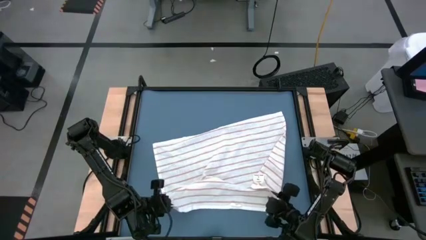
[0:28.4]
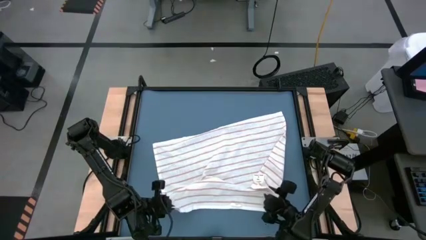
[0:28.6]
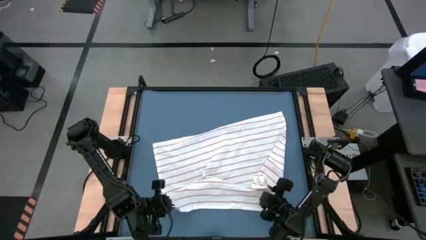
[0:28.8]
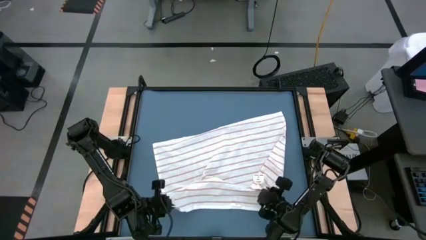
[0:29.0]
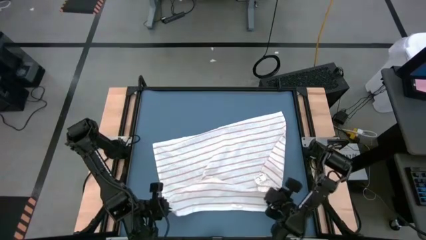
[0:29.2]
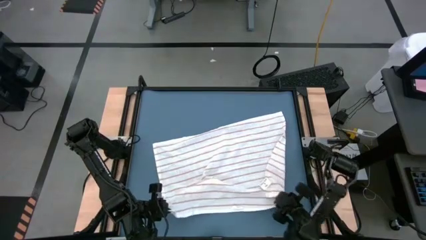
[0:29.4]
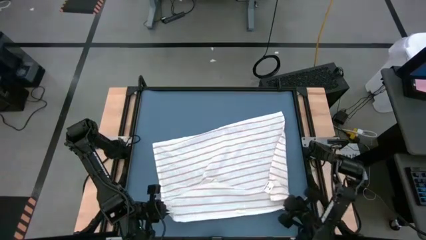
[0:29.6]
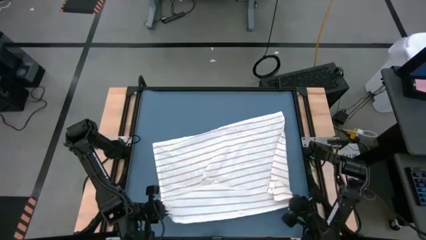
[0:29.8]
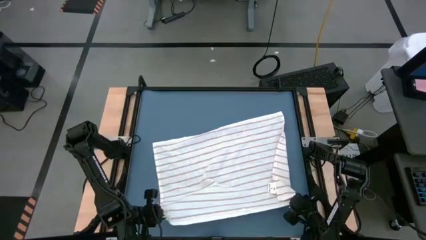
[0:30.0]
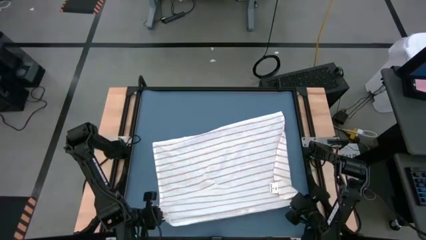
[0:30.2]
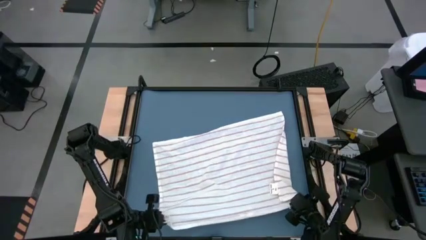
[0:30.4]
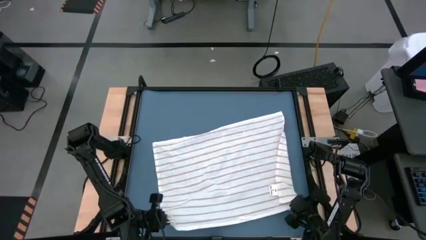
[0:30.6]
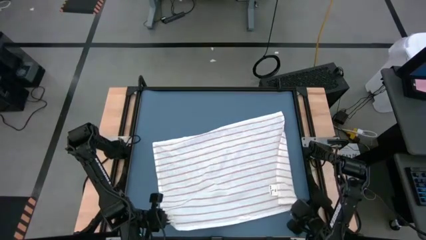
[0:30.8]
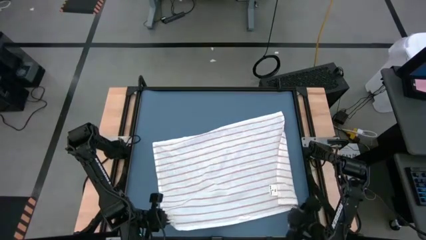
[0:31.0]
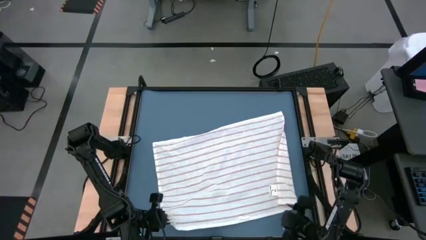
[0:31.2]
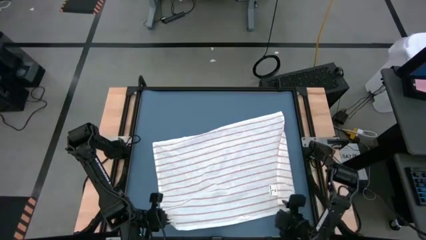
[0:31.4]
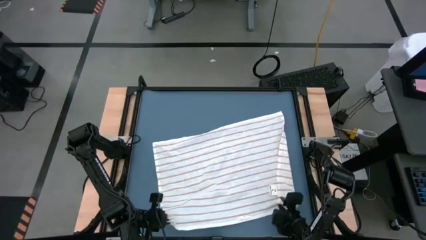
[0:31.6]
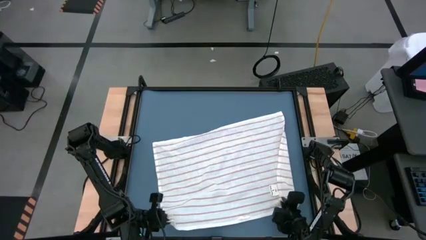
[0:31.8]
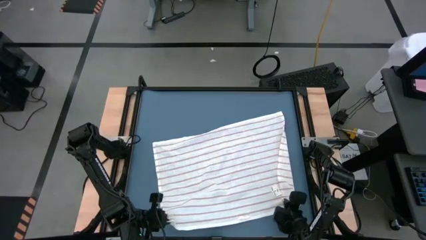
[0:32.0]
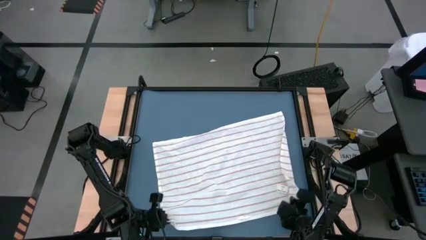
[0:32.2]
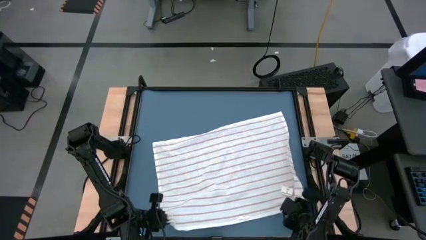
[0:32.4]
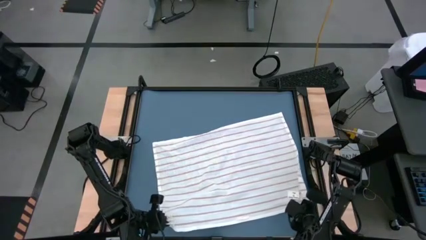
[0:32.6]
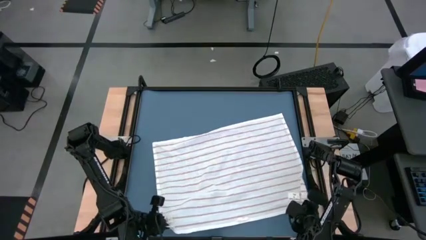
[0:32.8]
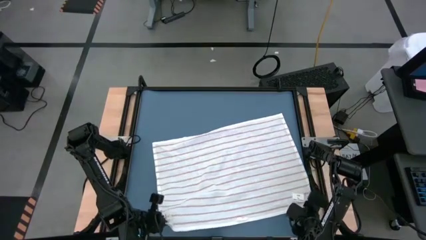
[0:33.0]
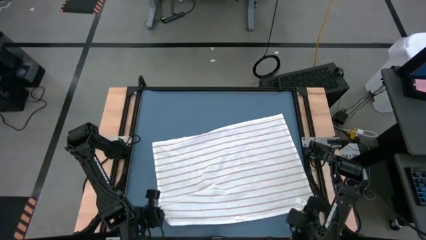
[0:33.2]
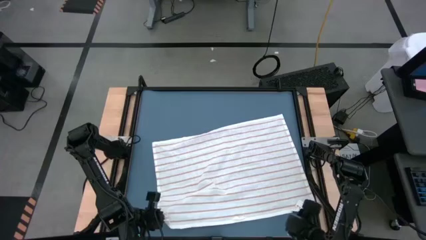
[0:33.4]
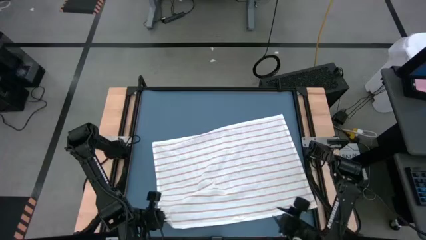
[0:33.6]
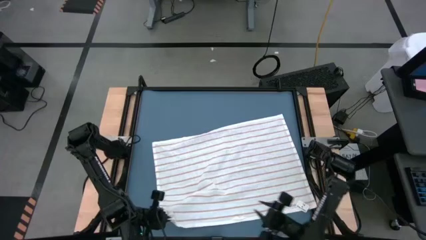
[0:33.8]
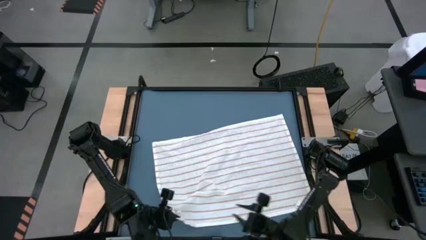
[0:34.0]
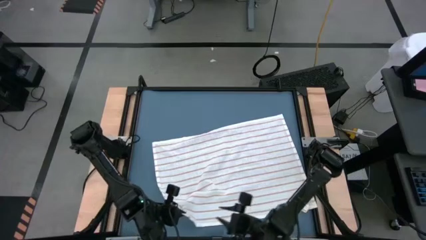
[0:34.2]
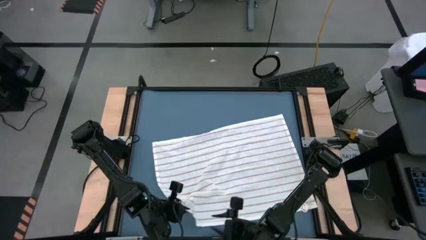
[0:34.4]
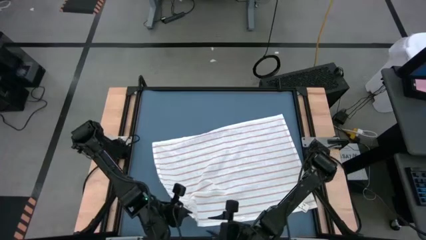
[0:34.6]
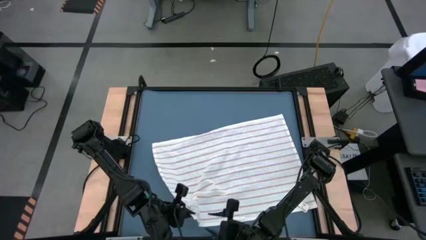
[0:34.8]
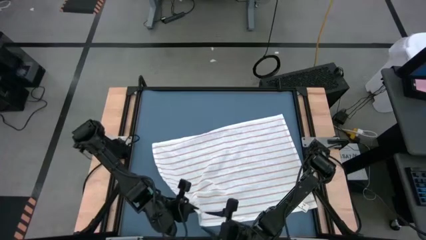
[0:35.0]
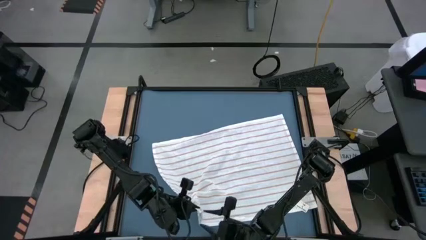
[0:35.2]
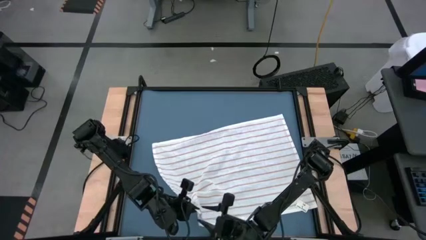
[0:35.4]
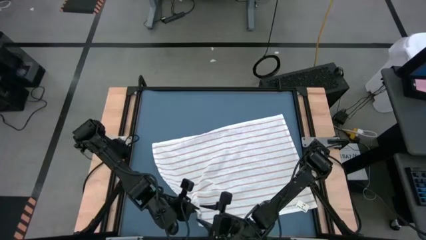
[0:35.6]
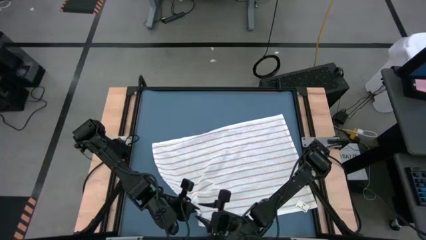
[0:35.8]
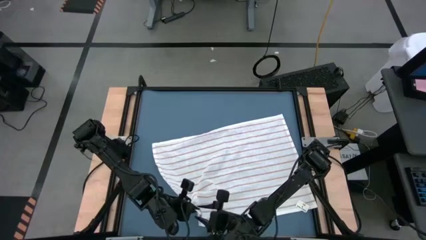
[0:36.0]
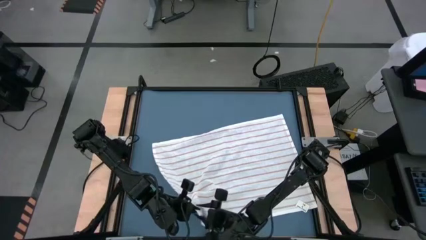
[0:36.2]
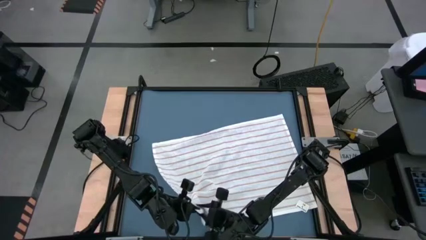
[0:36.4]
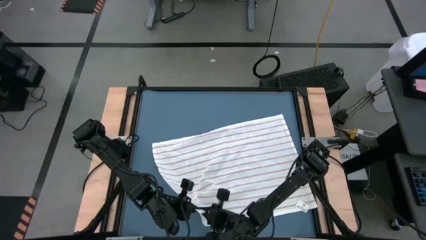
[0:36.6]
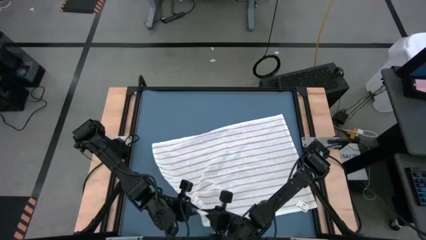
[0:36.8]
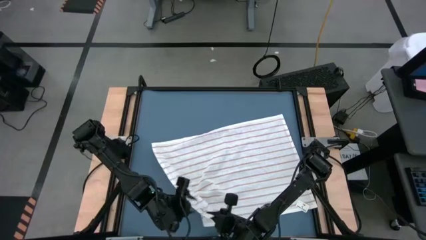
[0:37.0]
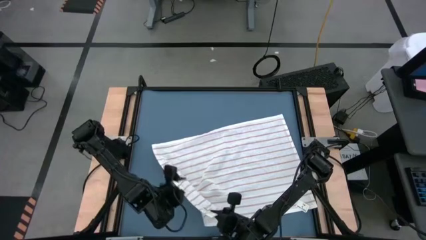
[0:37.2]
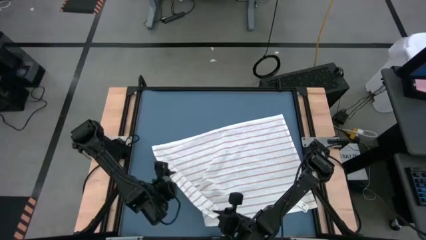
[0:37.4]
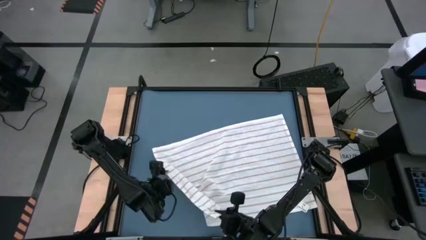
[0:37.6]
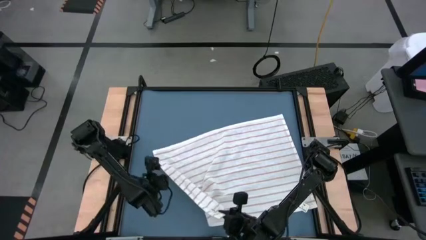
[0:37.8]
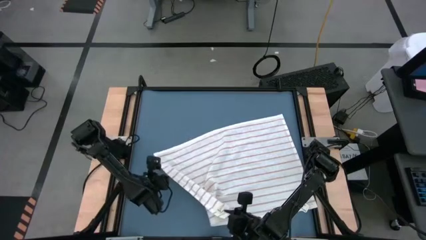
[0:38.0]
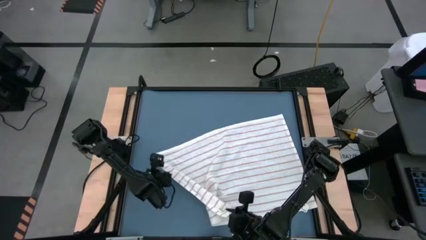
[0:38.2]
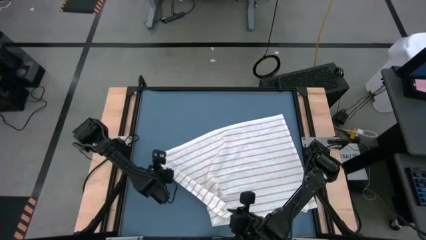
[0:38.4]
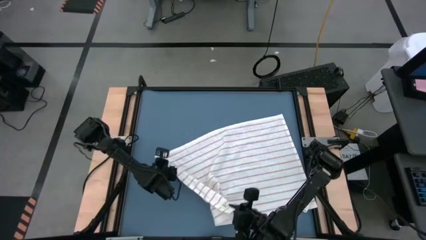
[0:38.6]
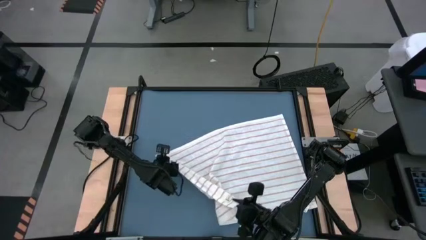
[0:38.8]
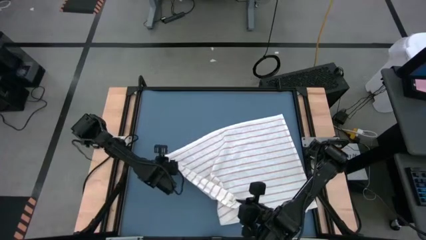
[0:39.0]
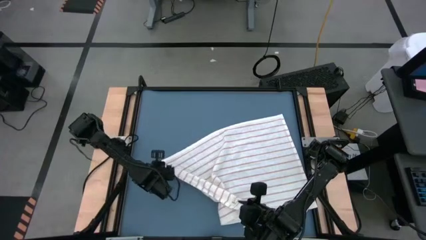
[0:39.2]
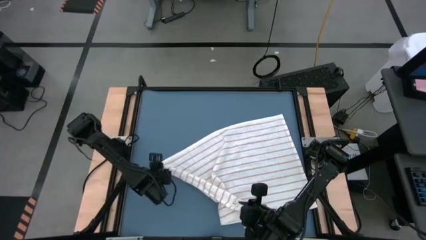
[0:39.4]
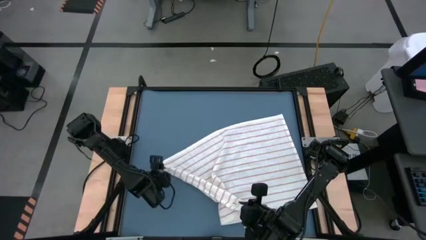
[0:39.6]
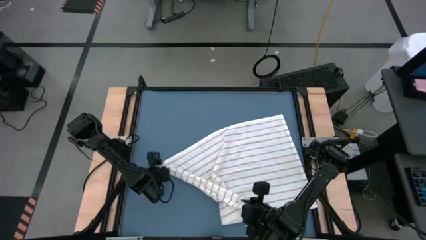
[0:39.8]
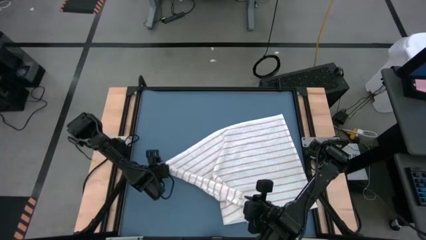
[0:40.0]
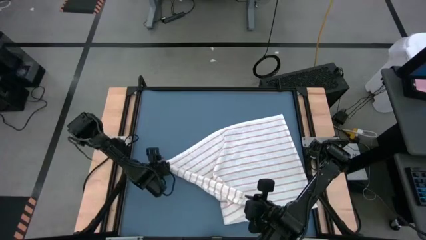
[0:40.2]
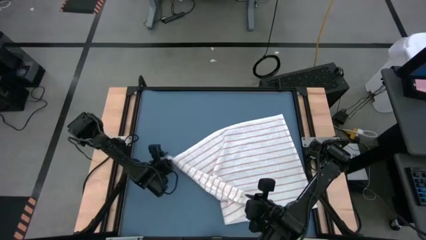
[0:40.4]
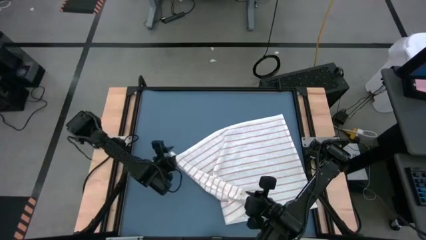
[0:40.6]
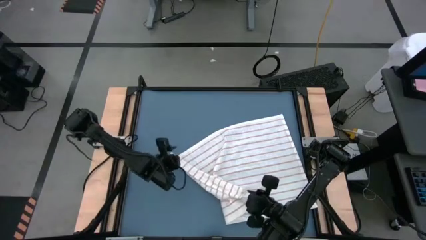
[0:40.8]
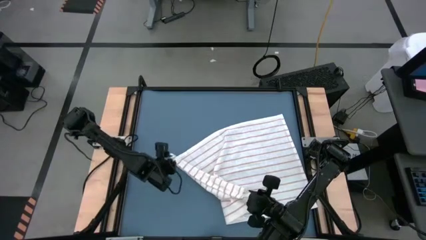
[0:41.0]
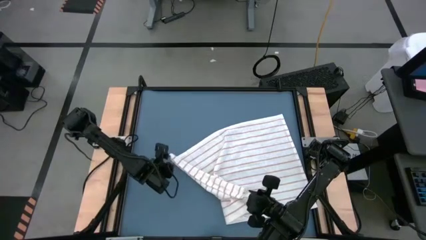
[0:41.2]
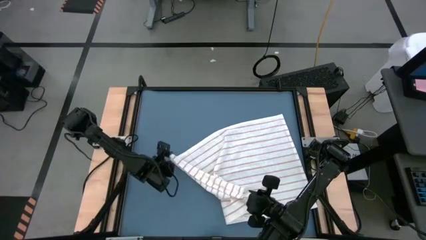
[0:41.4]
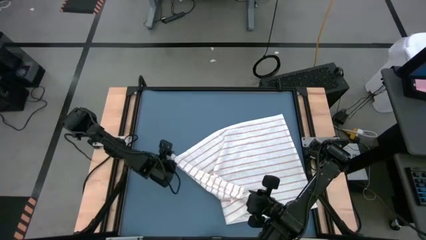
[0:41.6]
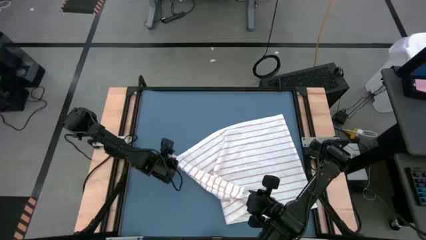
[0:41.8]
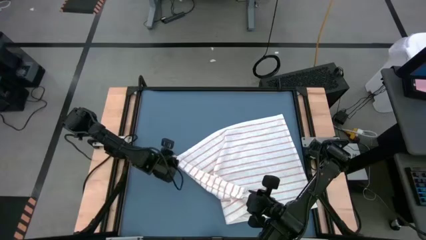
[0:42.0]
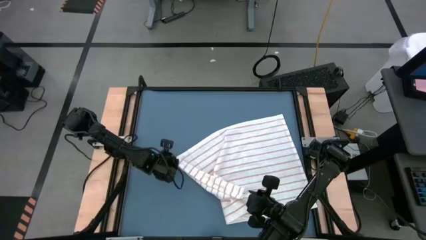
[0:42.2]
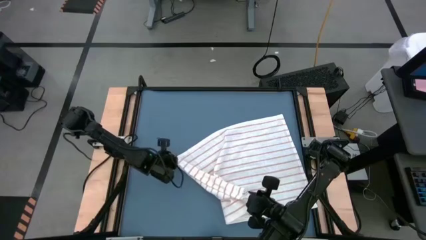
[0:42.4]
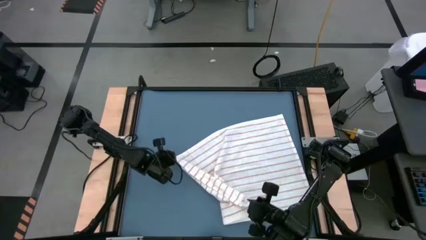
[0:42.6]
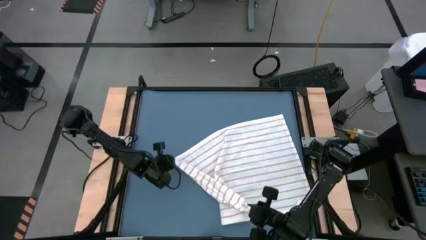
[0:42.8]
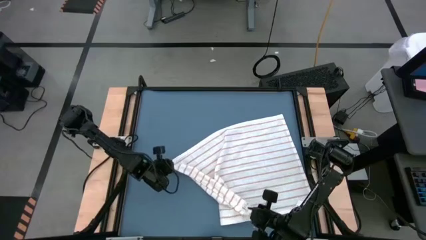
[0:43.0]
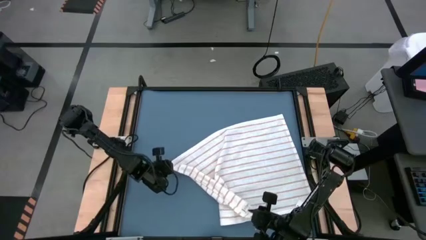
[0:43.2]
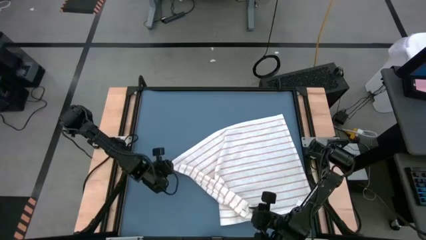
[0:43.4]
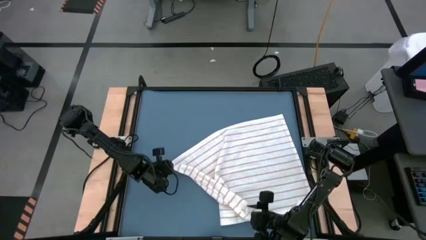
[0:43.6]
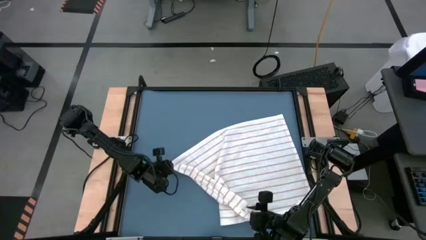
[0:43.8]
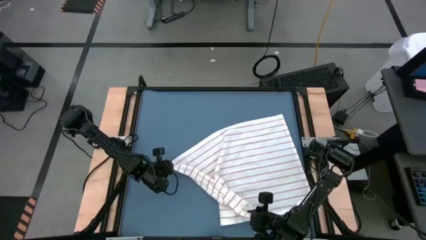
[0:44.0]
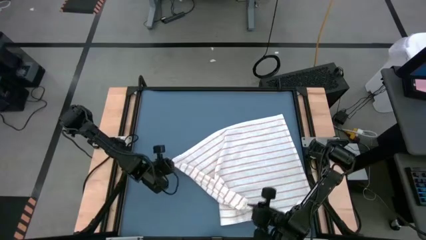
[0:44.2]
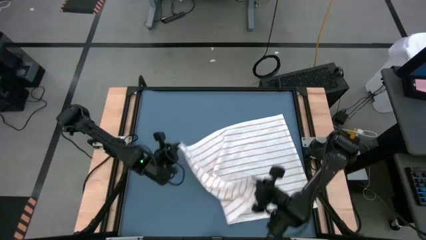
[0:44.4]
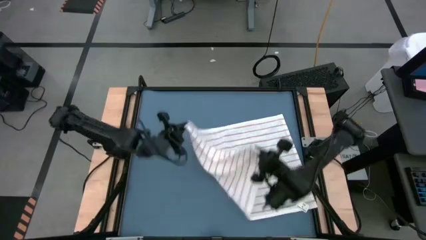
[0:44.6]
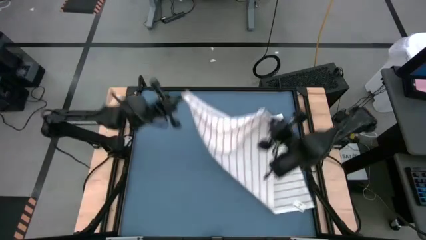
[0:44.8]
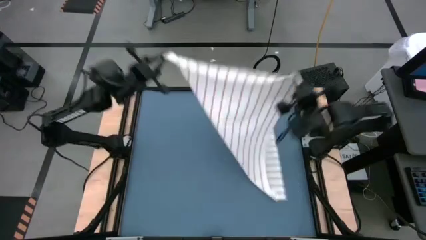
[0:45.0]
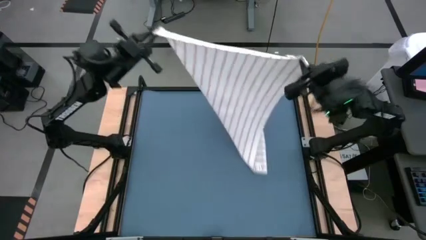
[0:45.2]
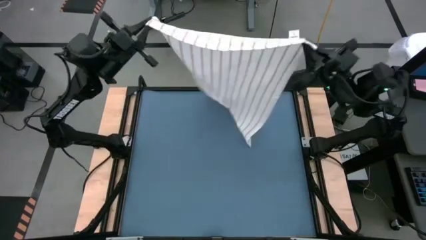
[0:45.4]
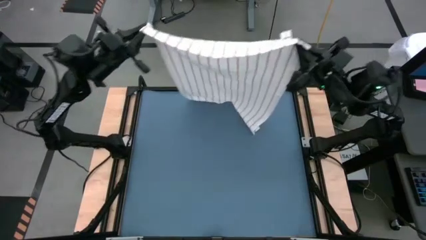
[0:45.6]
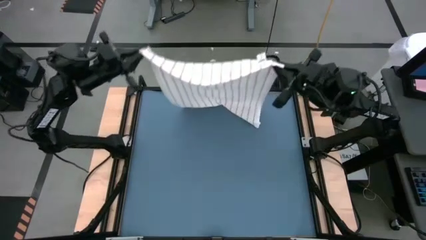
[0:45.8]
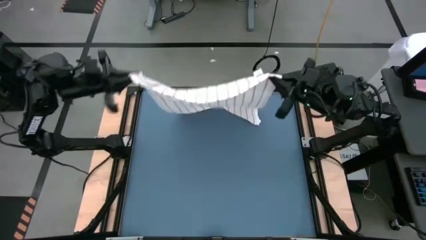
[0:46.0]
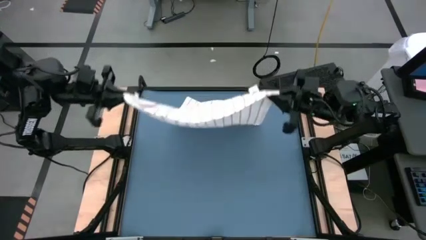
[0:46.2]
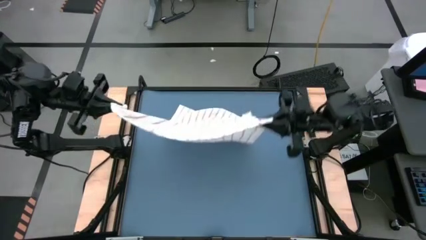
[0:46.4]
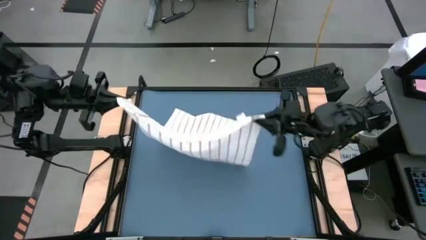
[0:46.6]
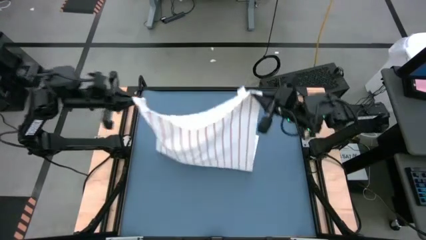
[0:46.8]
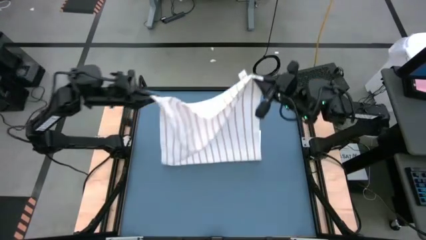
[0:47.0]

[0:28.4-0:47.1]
Task: Roll towel
Fold the white towel
